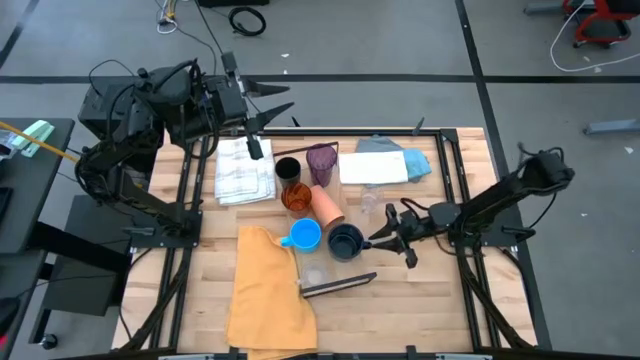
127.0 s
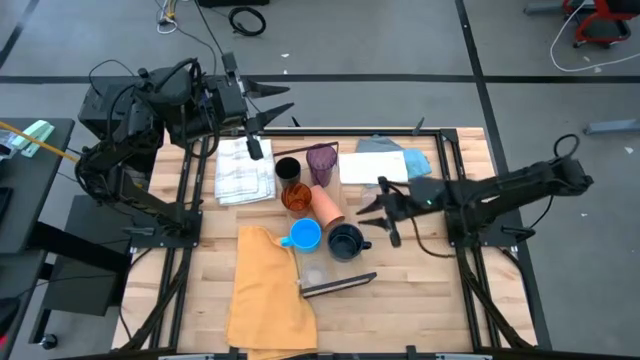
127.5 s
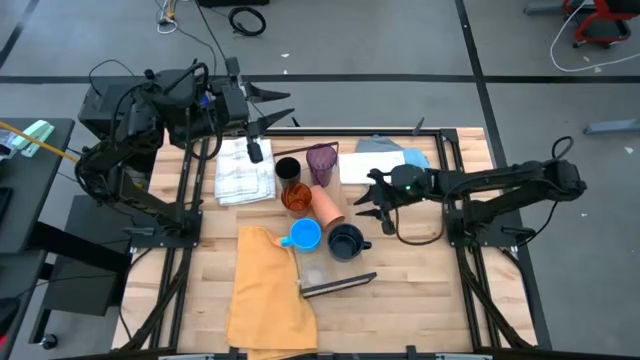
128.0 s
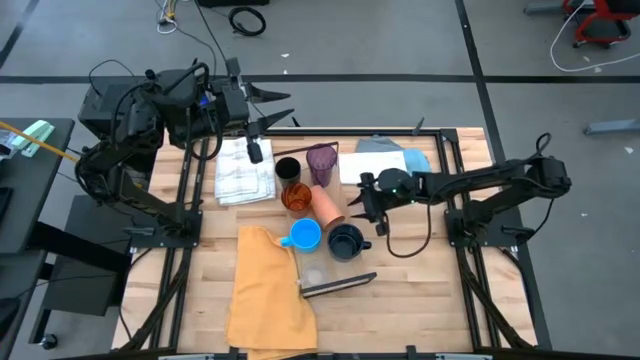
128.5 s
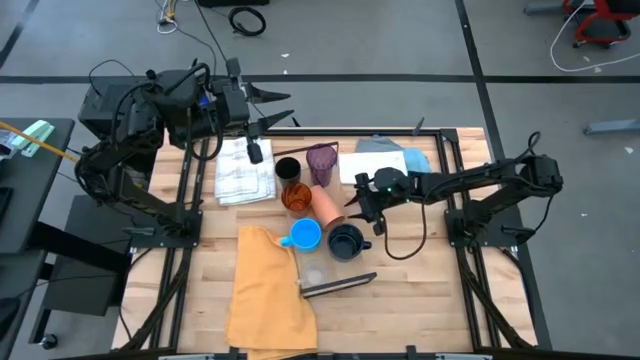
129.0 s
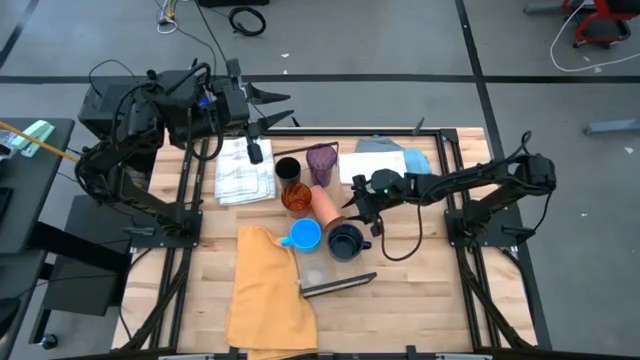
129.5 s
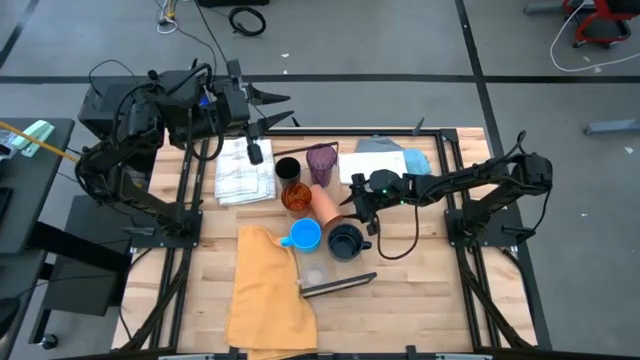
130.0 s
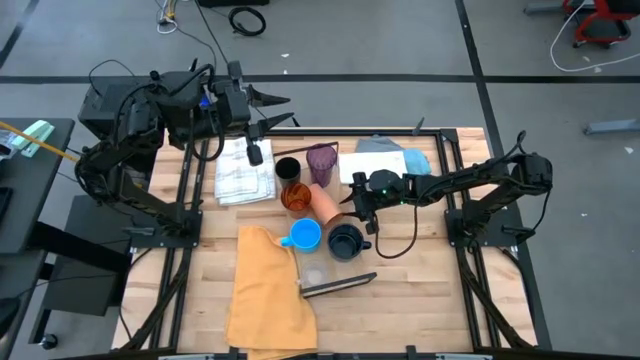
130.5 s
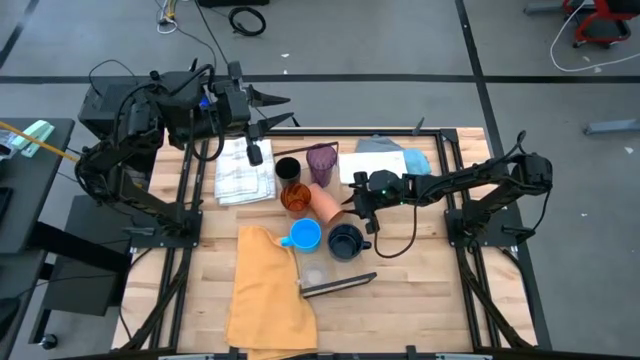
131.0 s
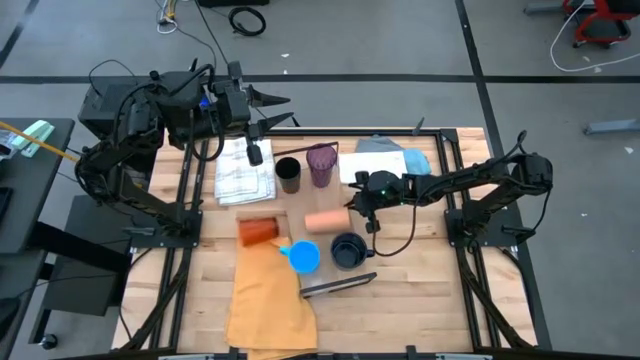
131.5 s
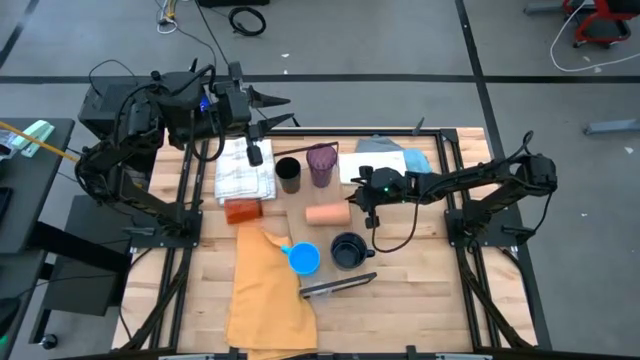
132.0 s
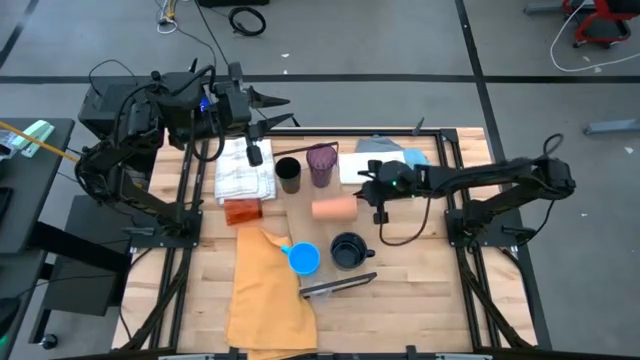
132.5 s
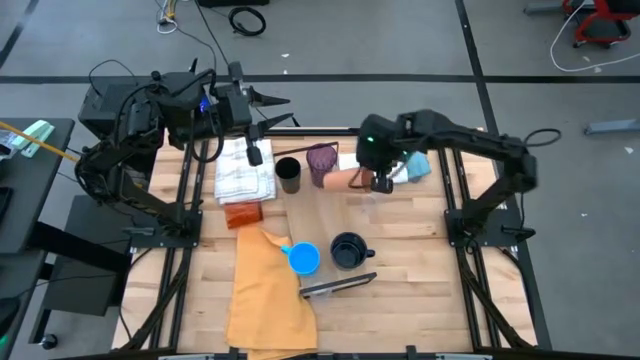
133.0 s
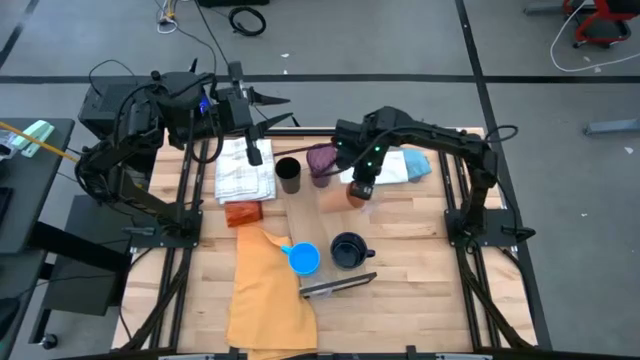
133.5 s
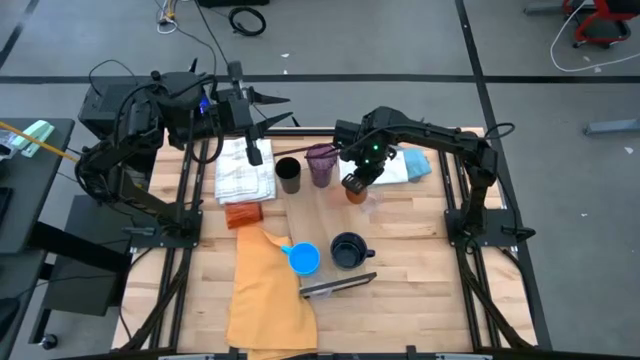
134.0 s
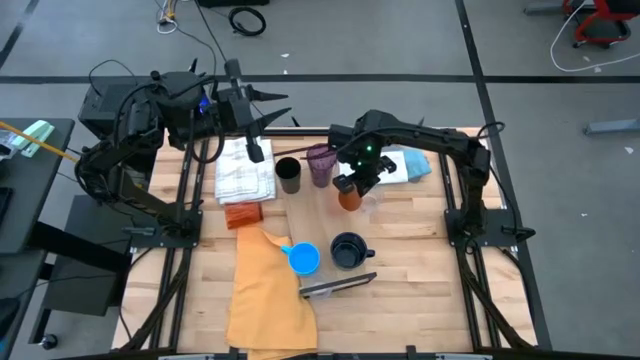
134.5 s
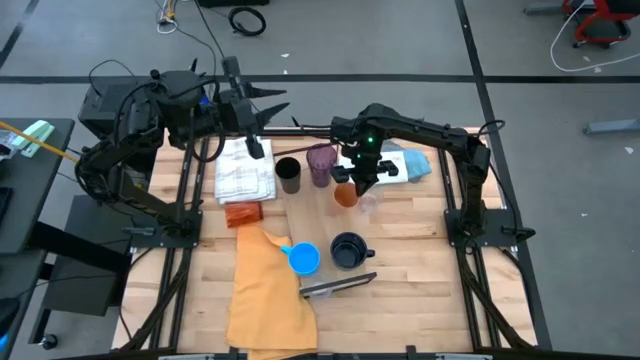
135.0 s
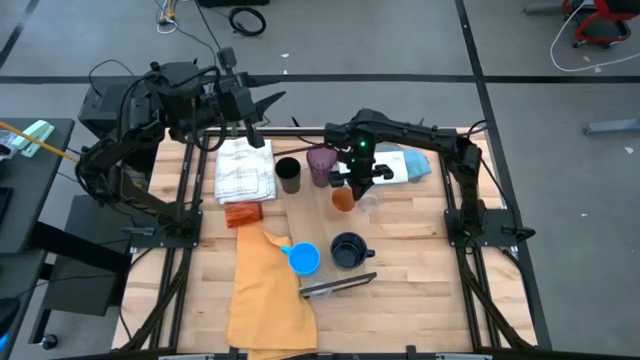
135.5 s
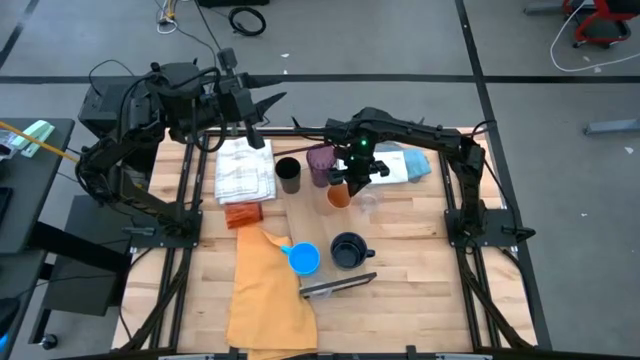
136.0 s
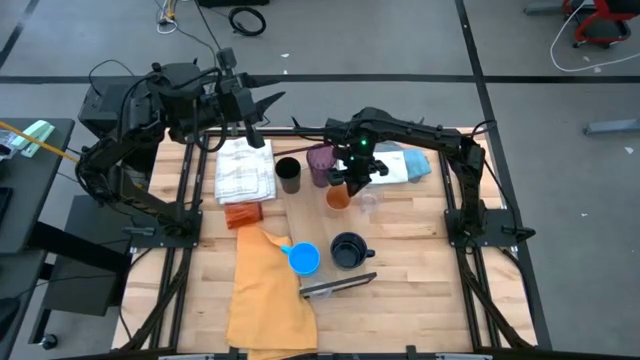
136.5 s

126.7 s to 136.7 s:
Task: Stack small to large cups/mugs on shelf
Adjust the light orange cup on the shelf

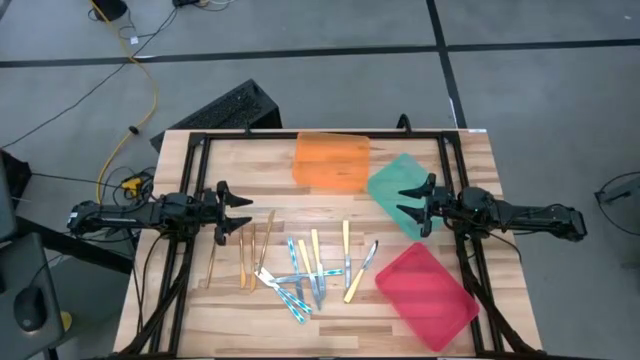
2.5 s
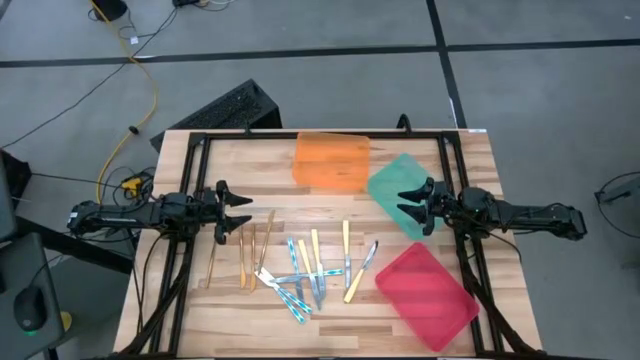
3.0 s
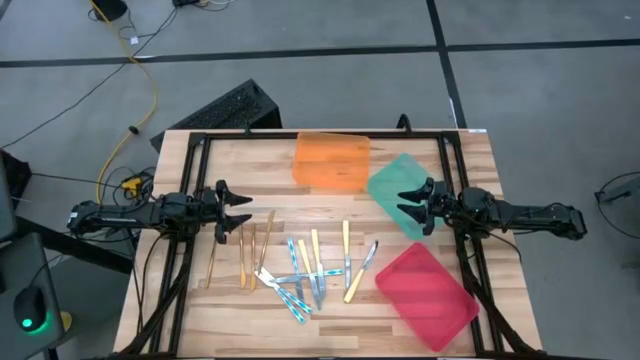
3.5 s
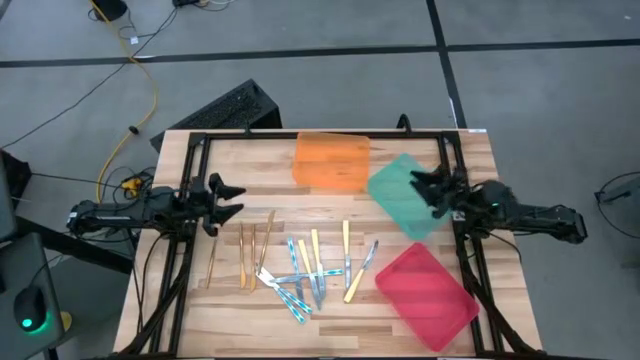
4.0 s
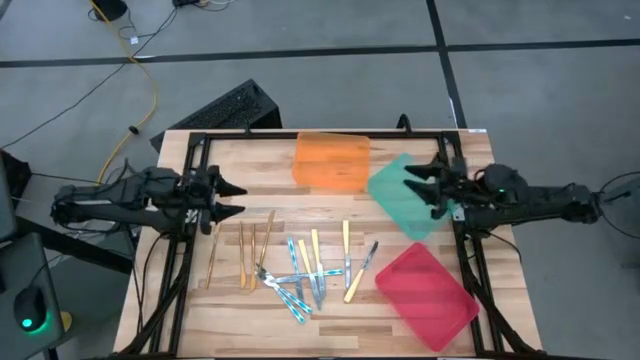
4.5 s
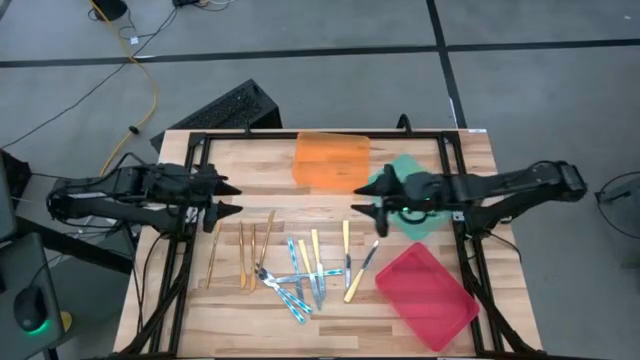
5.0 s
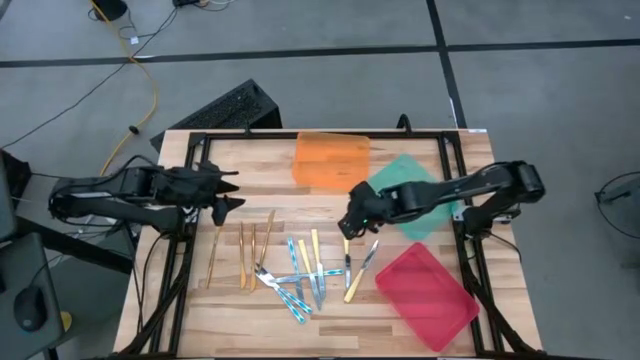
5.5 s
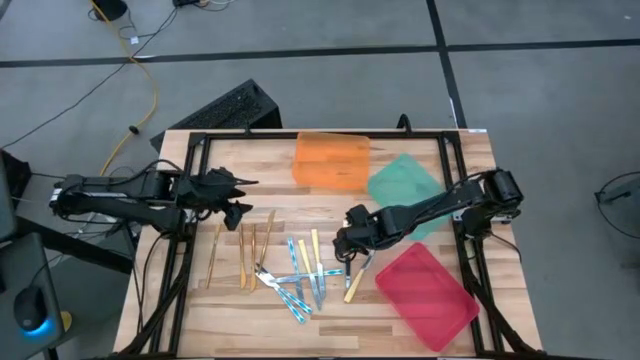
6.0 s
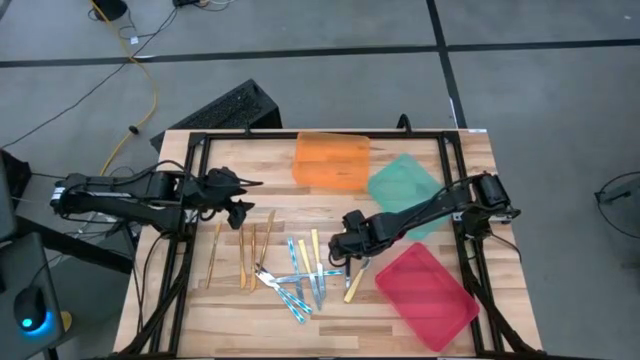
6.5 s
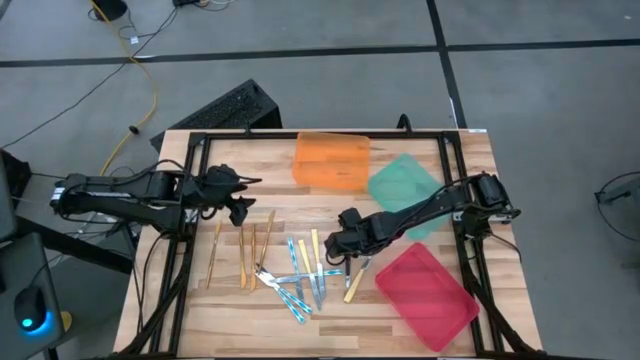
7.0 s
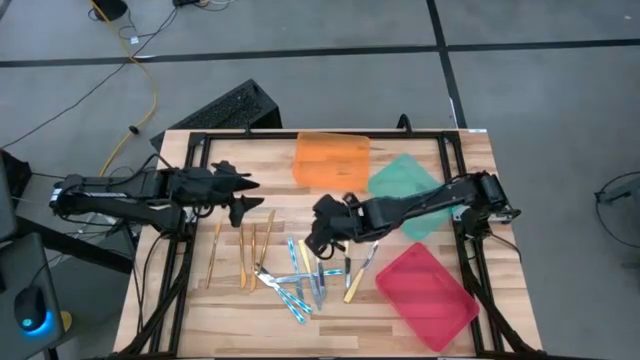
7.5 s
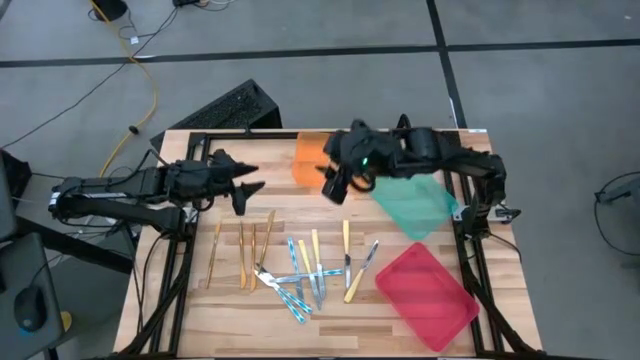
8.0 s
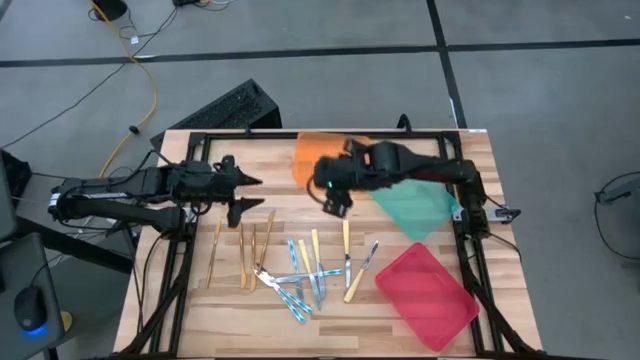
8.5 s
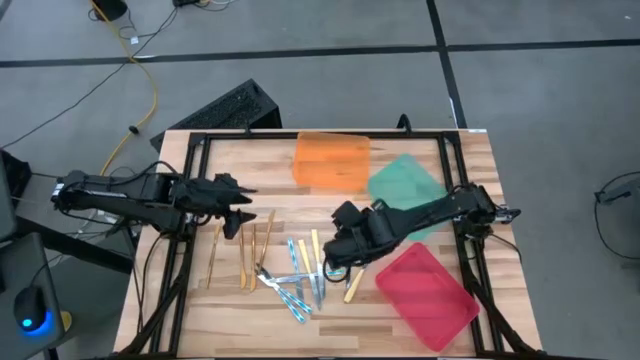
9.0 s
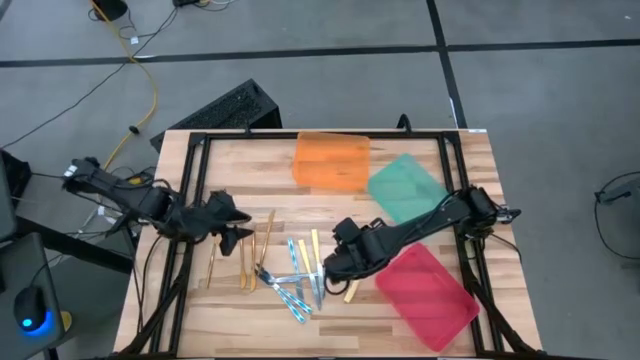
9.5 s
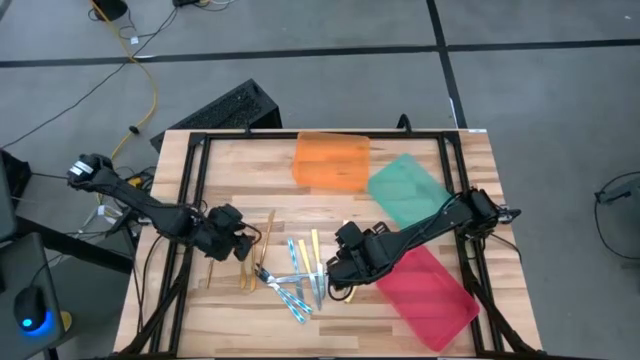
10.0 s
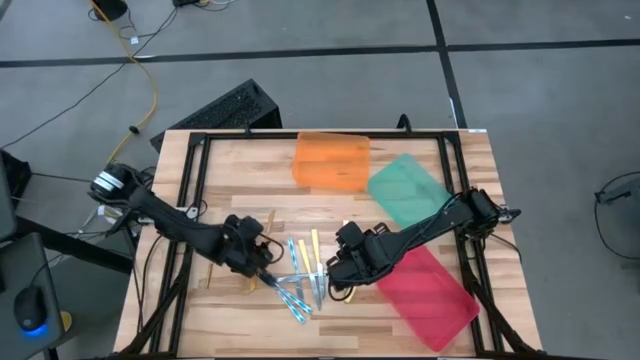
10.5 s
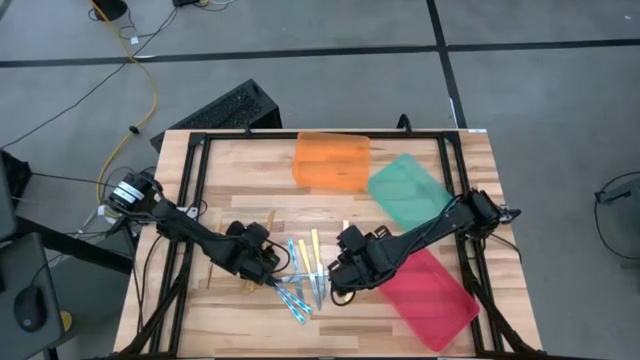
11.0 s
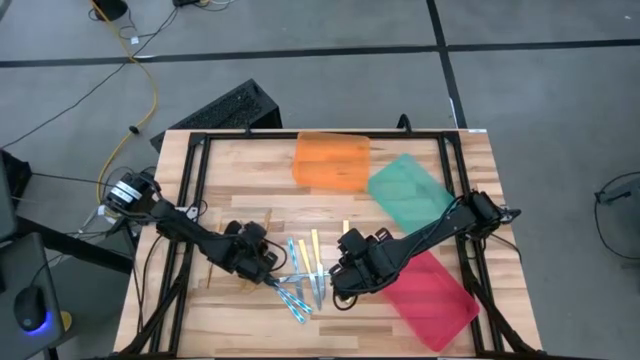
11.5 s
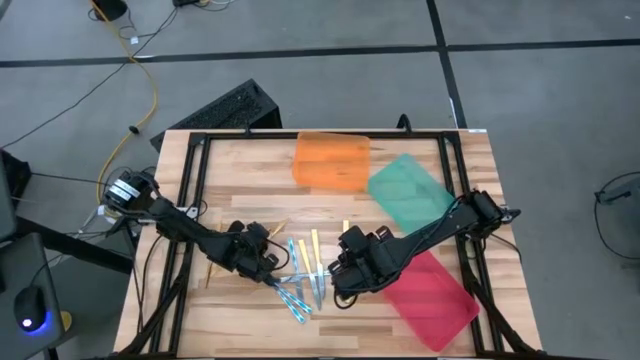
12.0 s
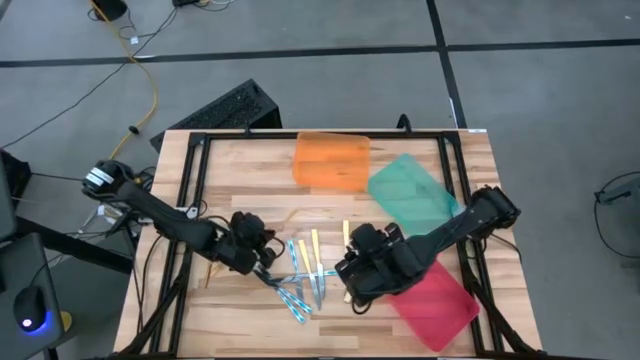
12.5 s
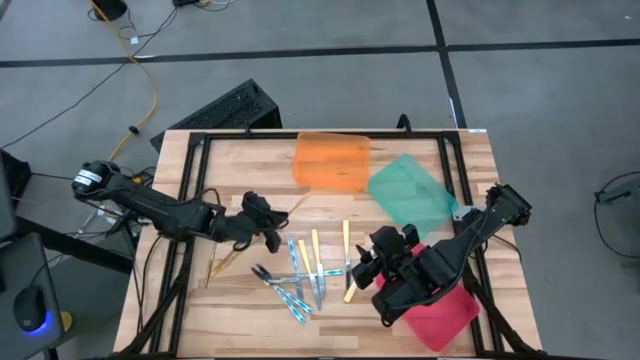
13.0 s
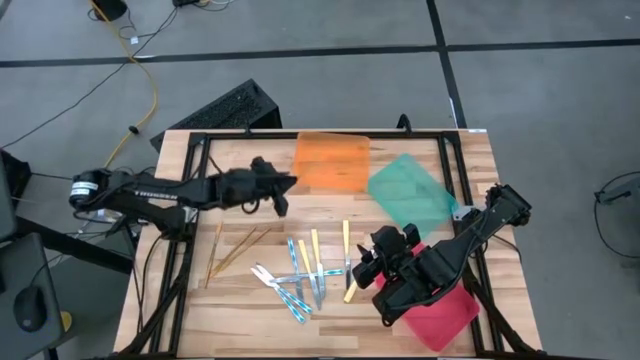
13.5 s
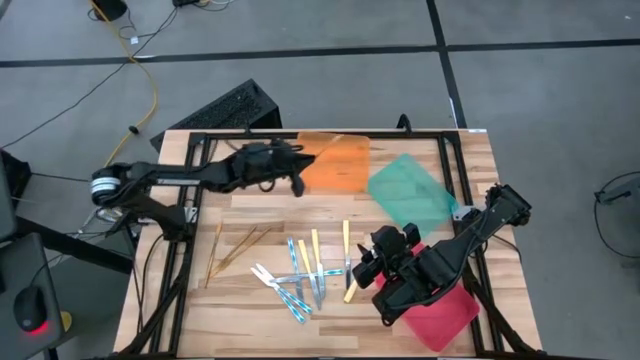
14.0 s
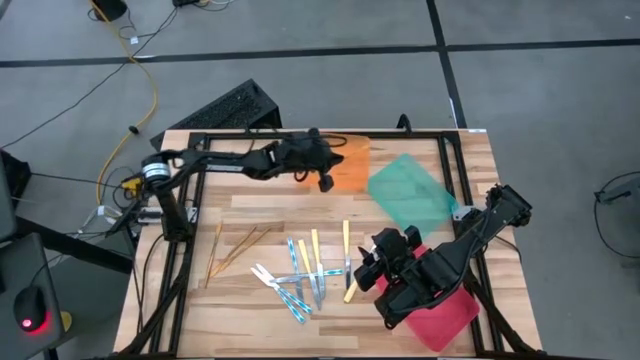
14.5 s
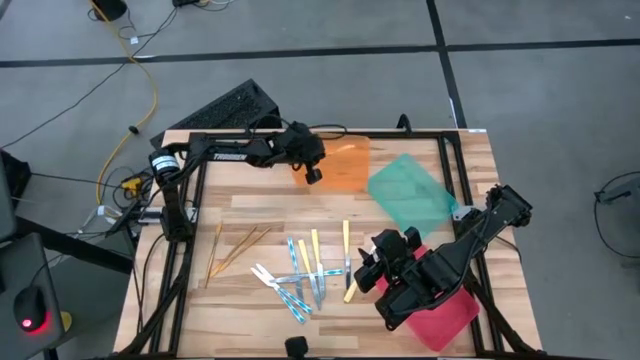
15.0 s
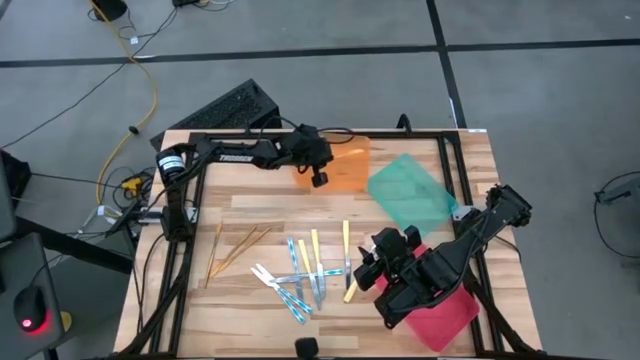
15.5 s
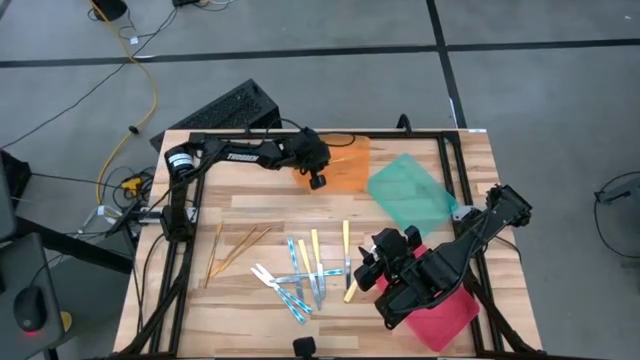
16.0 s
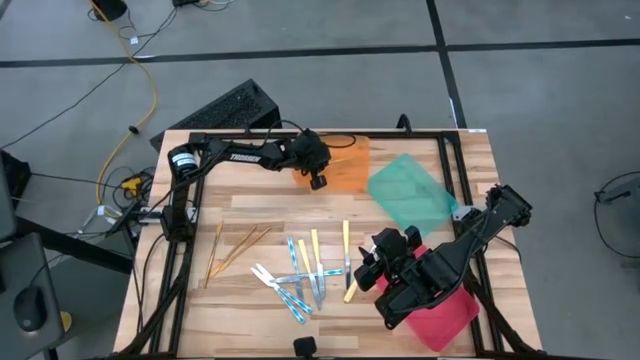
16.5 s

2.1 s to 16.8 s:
Task: Sort silverware by color (type)
Put the gold knife into the orange bin
